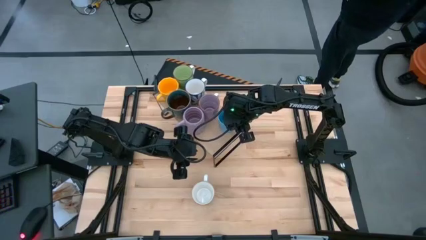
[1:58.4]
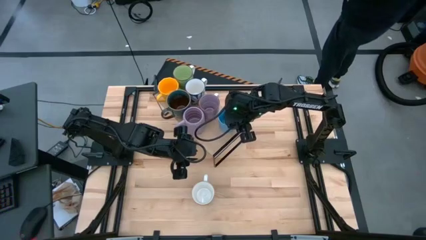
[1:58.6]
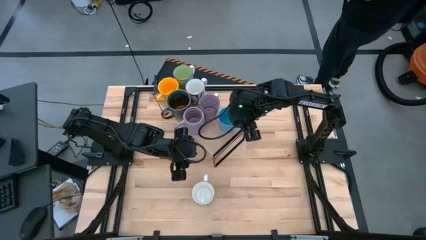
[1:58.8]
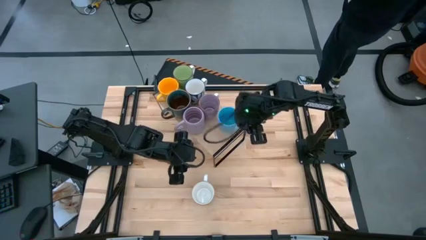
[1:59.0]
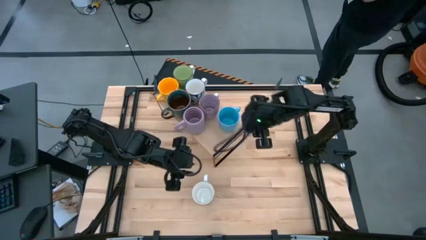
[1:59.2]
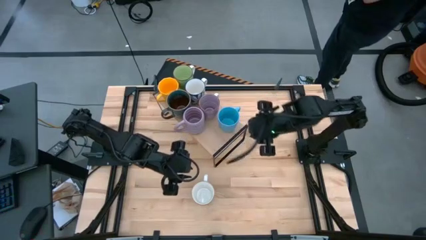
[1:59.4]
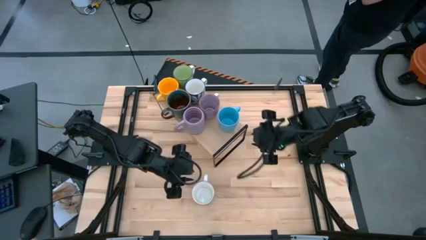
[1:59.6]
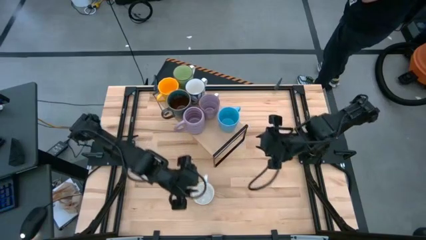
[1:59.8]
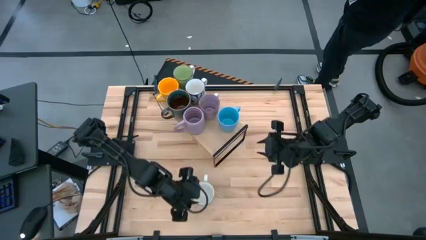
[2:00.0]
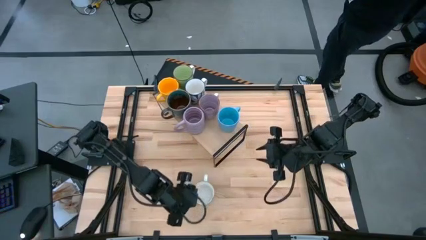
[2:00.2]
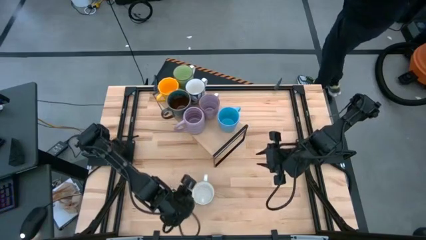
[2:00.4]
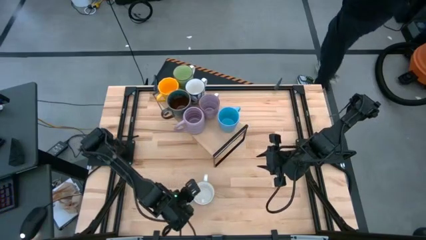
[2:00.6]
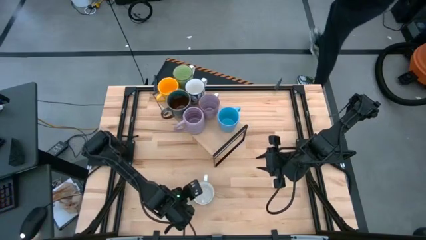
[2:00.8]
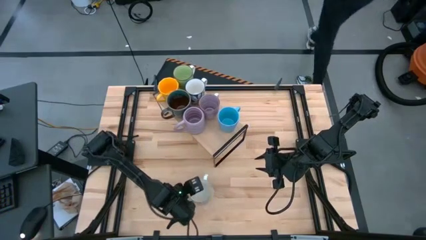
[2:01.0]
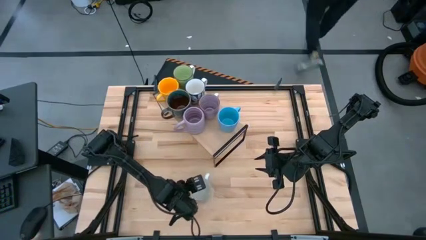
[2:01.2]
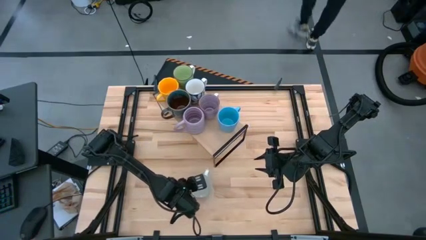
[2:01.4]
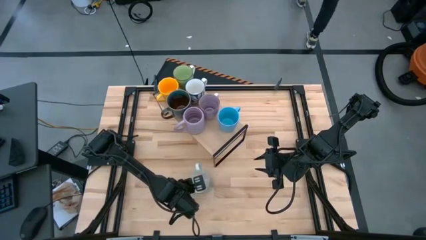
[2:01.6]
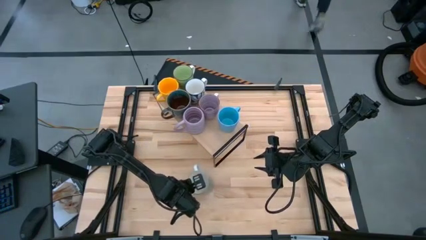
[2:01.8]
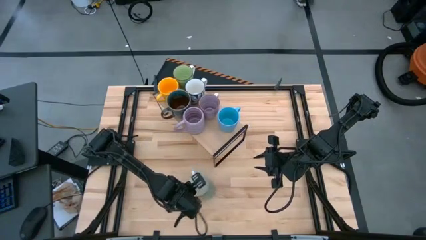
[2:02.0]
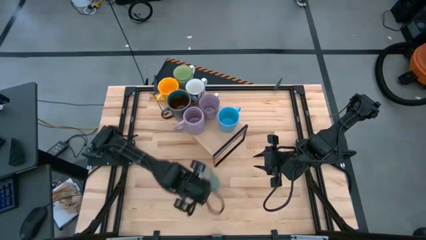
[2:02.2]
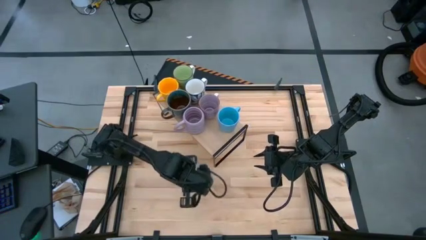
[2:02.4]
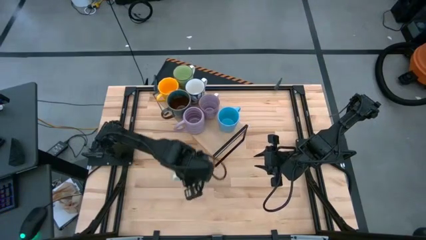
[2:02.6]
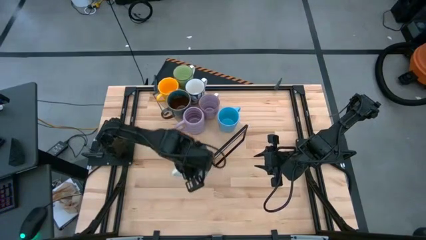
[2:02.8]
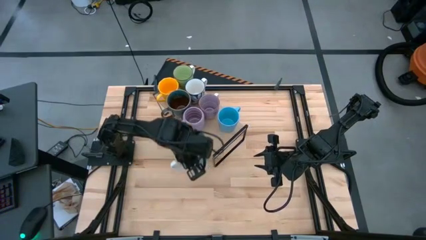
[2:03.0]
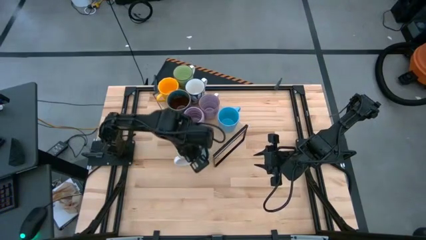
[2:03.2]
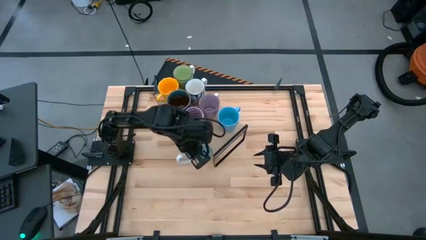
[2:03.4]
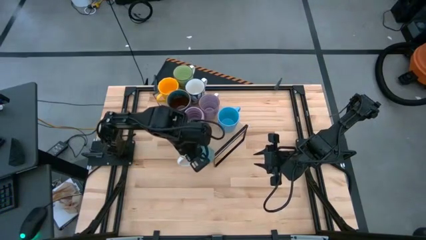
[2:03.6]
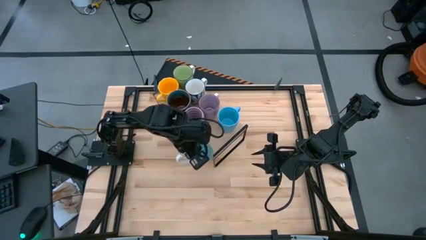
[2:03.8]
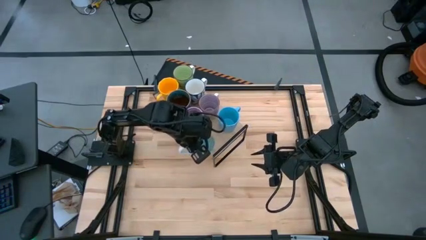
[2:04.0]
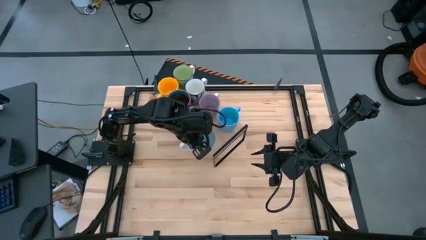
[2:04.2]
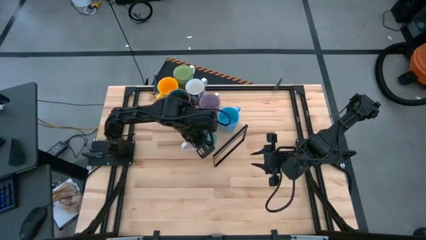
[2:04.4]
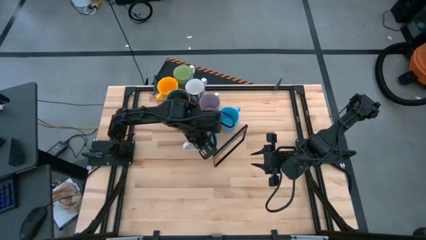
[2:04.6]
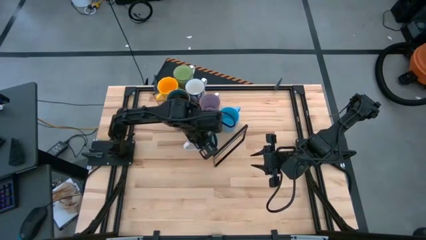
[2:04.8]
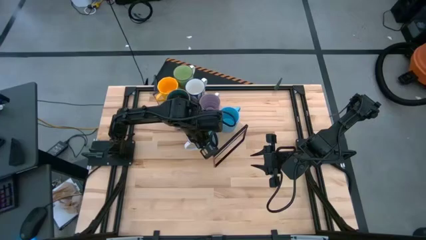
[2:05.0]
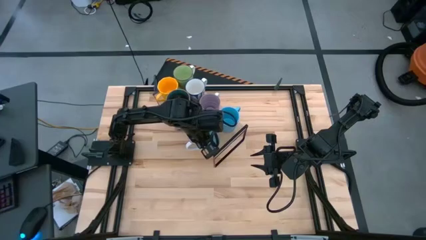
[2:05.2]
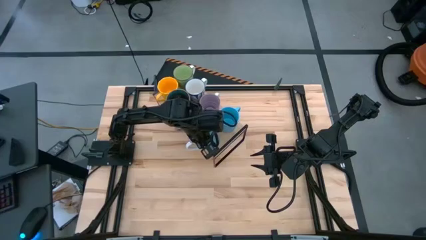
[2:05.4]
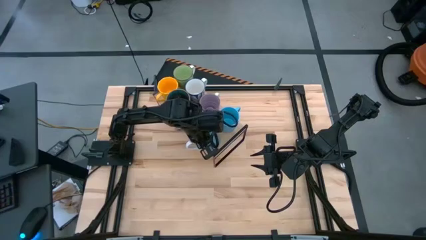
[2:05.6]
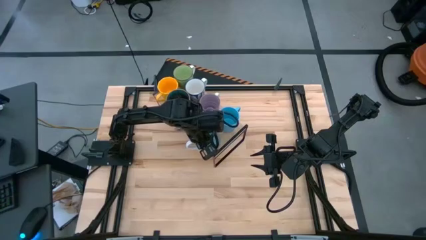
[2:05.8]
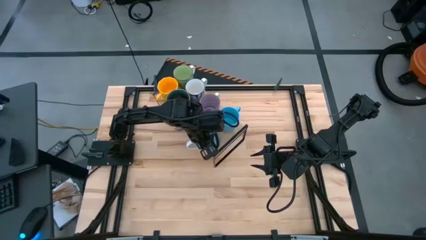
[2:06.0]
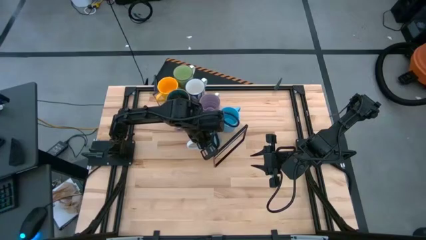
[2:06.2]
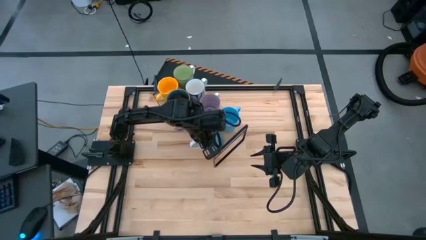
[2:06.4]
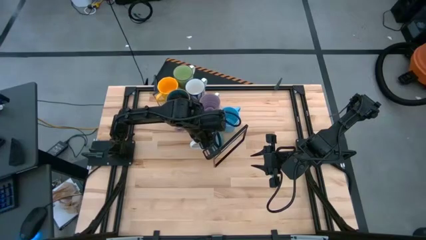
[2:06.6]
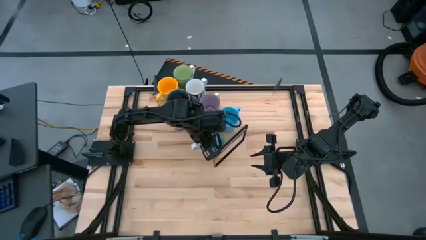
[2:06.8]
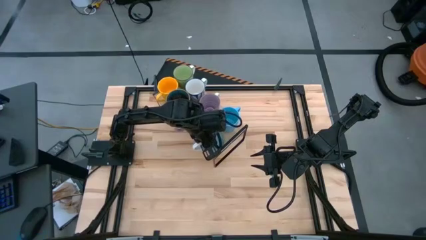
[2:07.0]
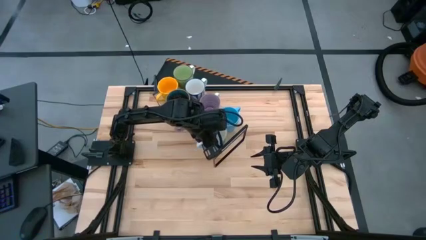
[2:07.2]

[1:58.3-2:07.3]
Task: Place coffee mugs
Put the green mug on the shelf

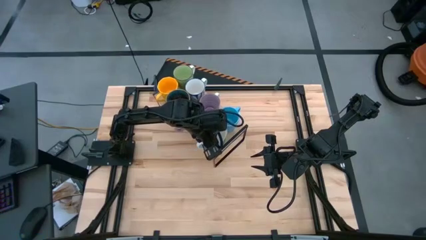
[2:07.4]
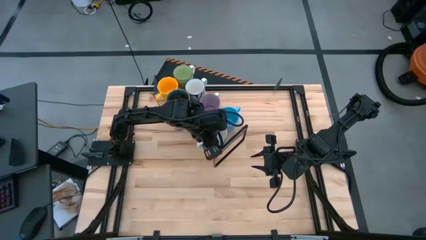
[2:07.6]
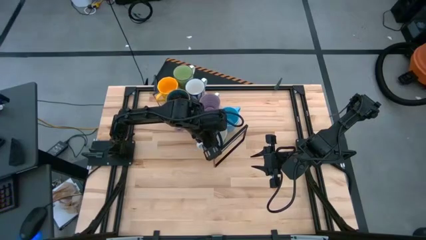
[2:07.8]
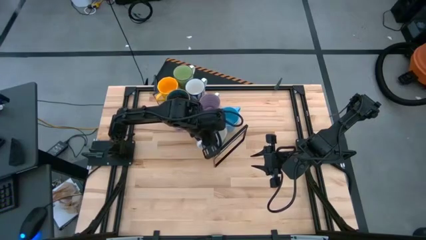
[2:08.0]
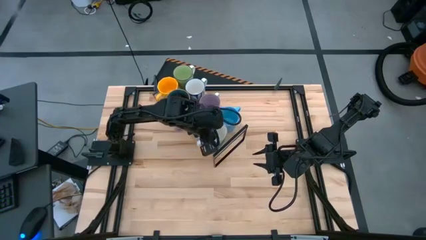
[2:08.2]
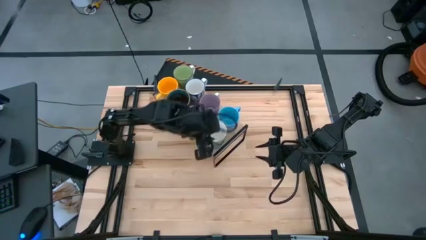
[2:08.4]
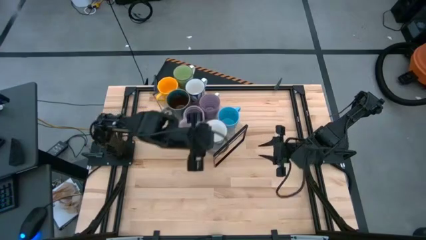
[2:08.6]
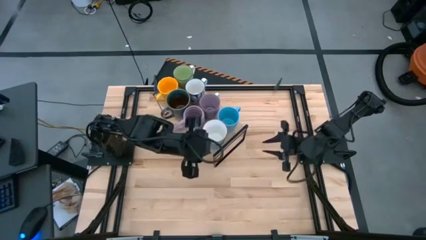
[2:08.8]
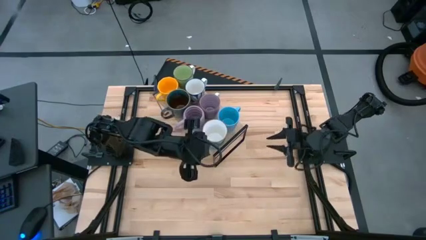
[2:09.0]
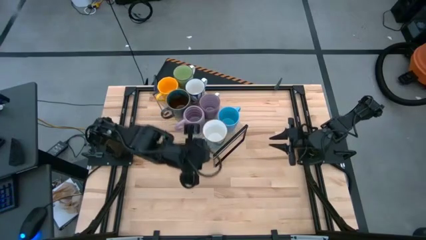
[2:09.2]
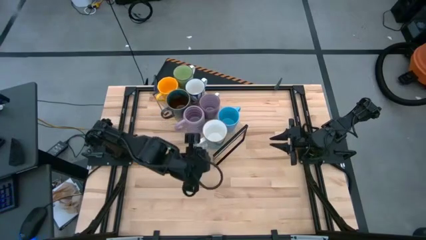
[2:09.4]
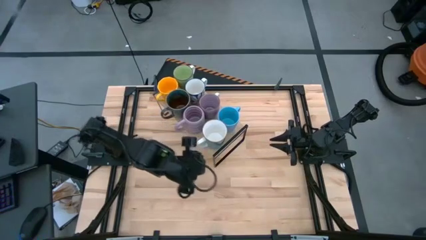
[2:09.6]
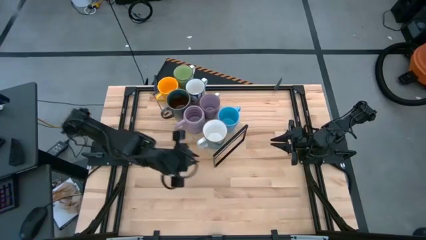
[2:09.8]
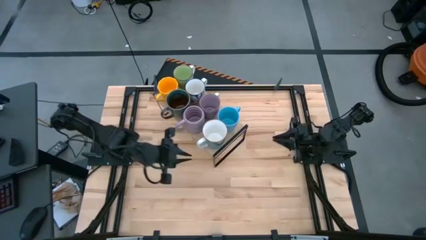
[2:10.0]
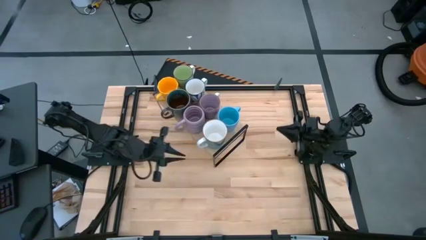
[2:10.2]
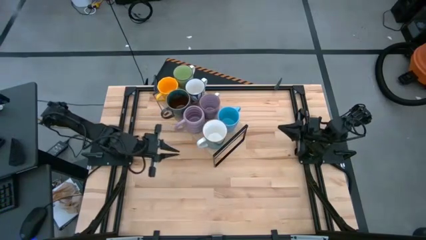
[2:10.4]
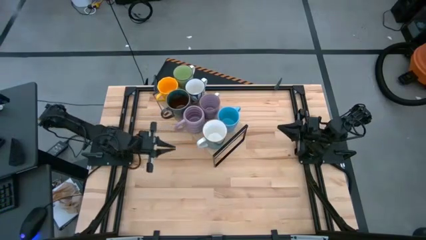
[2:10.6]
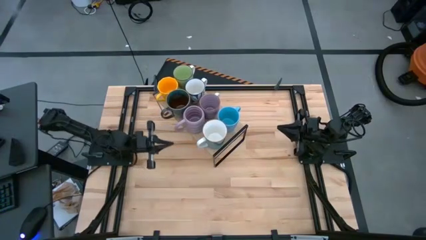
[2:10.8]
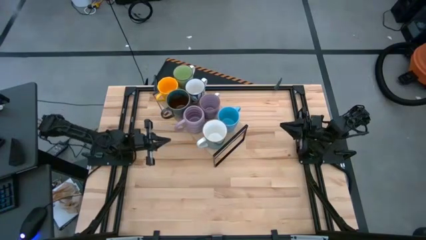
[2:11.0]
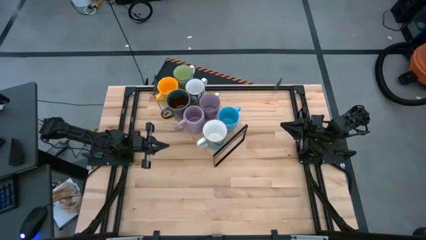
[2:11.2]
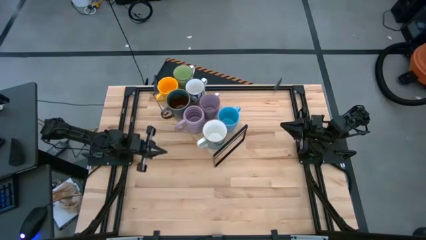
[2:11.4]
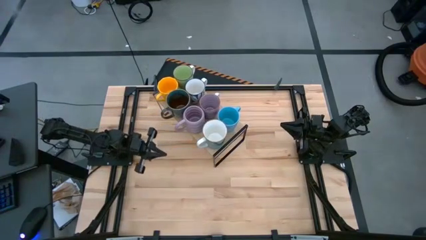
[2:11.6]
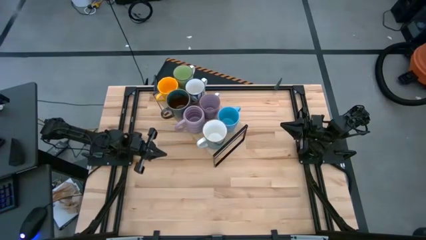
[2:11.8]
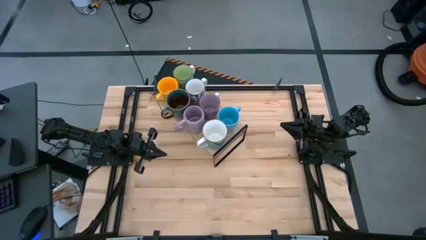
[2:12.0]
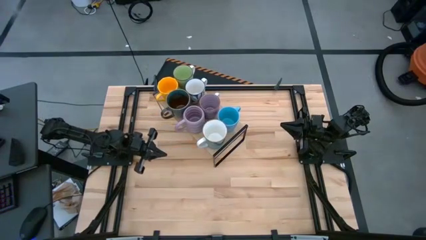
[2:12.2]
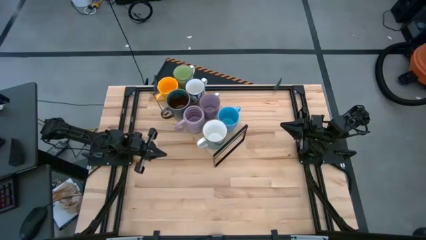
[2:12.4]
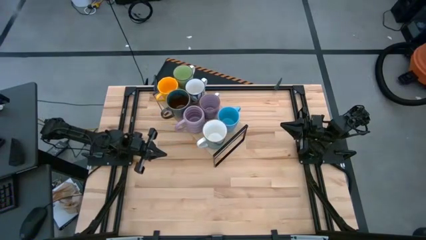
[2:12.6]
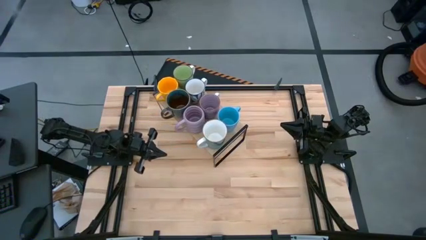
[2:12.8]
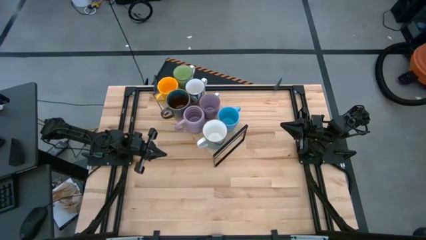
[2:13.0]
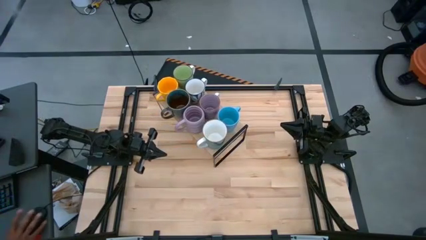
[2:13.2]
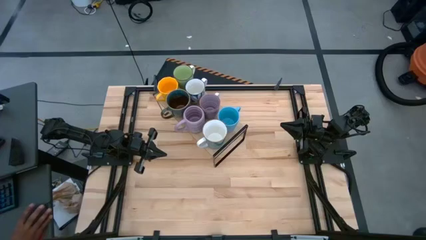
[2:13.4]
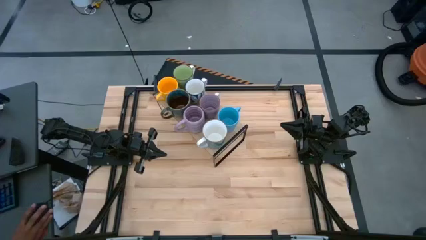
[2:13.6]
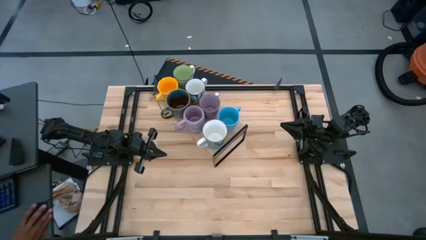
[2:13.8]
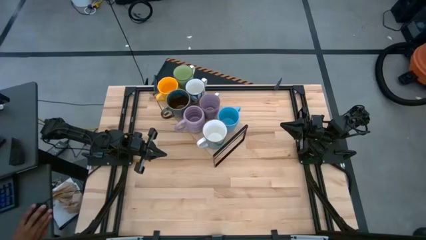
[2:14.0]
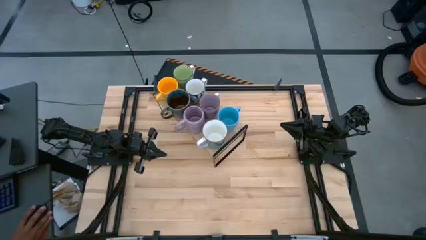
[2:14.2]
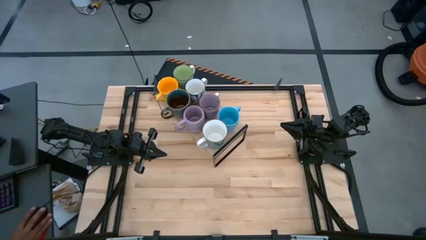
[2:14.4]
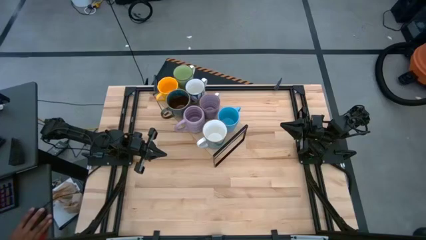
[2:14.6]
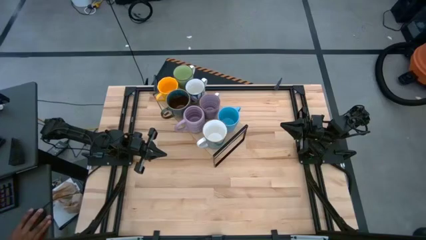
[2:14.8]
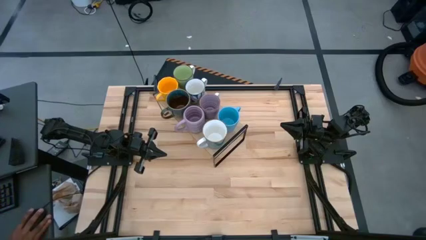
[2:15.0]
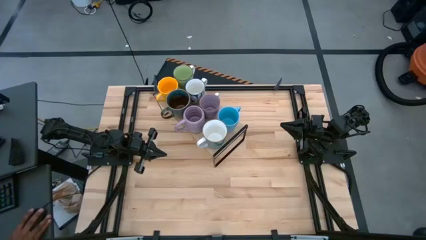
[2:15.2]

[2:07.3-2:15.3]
Return to Home Position

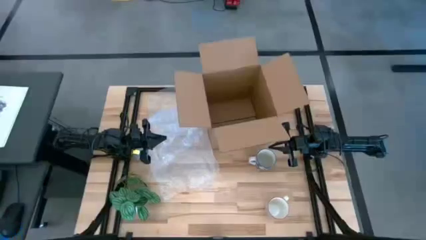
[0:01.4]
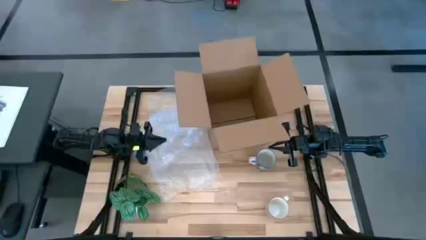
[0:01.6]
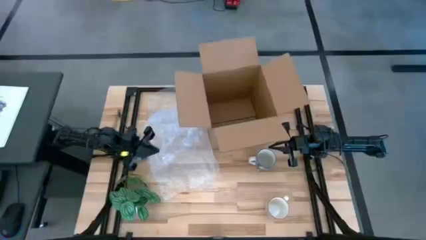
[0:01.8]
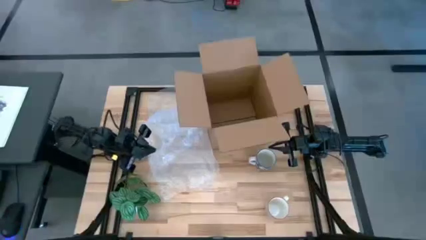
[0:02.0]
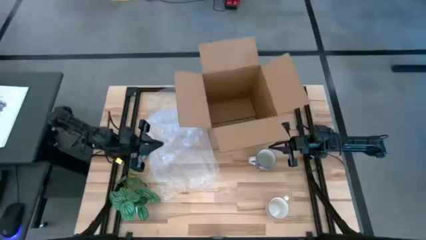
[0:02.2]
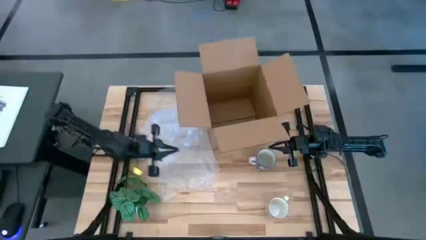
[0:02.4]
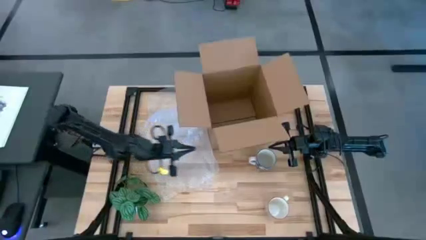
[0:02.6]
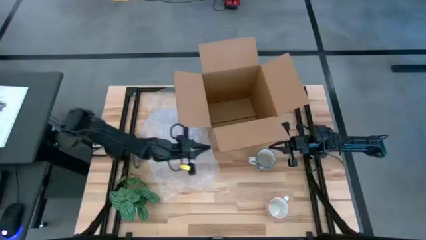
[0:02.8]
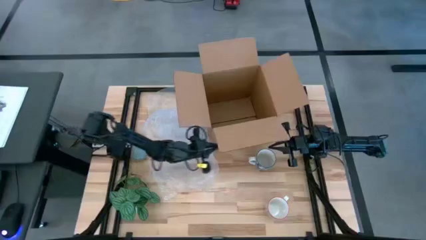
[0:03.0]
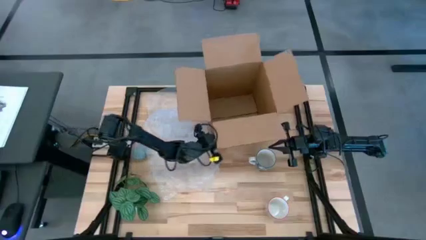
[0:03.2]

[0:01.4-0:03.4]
Task: wrap mug
Adjust the cardboard box
